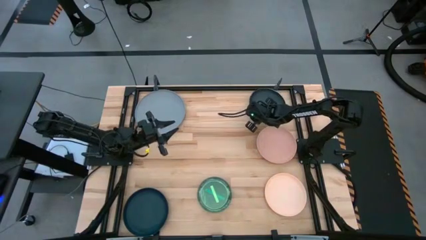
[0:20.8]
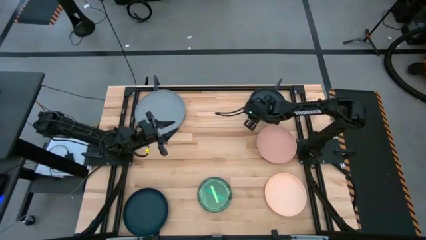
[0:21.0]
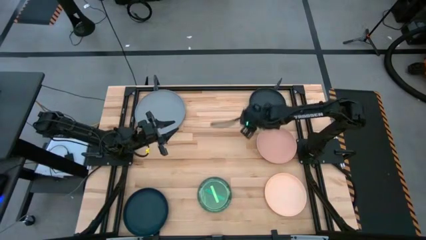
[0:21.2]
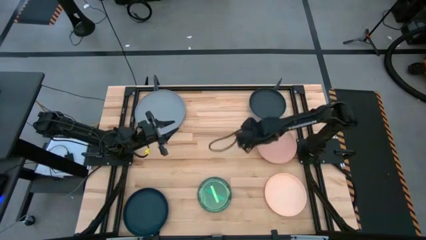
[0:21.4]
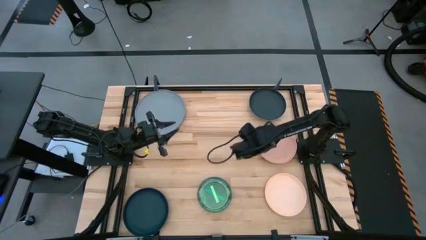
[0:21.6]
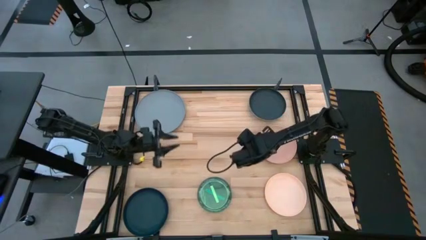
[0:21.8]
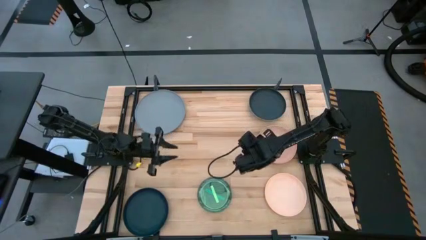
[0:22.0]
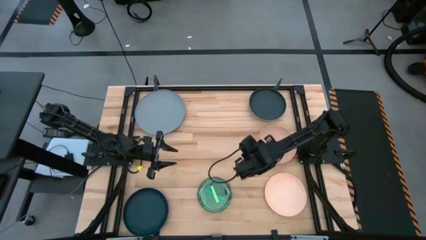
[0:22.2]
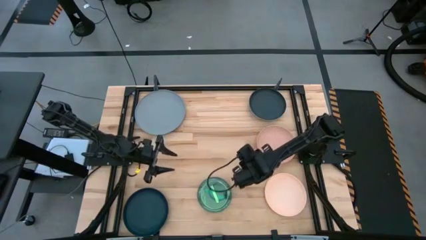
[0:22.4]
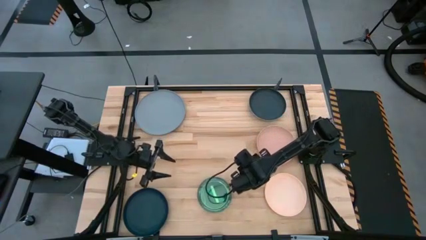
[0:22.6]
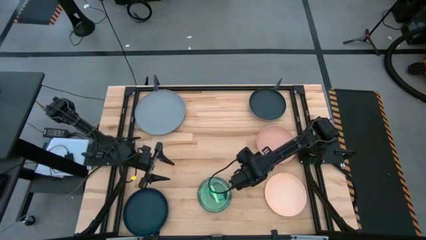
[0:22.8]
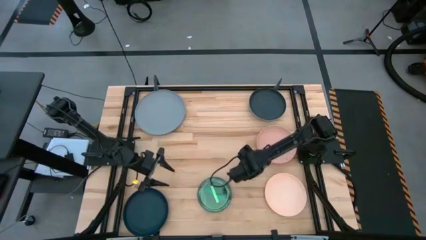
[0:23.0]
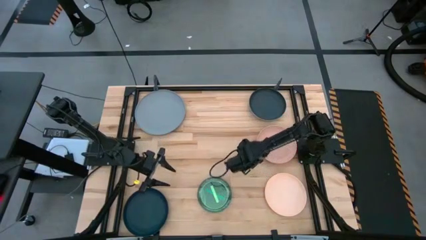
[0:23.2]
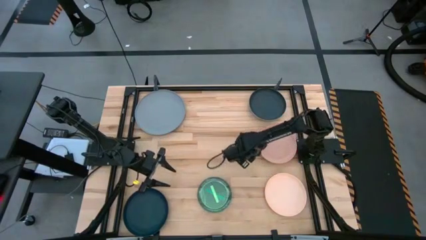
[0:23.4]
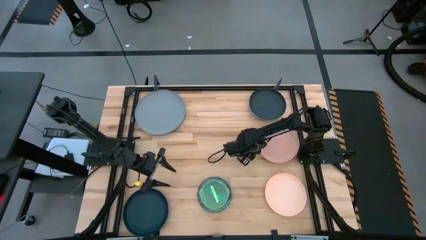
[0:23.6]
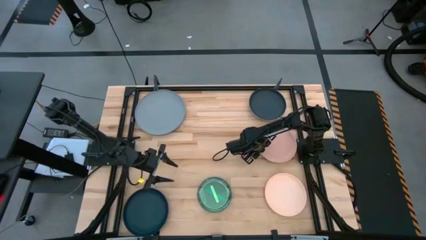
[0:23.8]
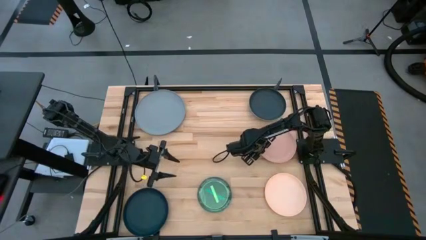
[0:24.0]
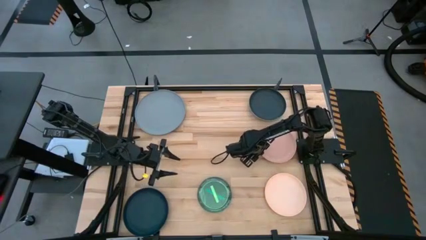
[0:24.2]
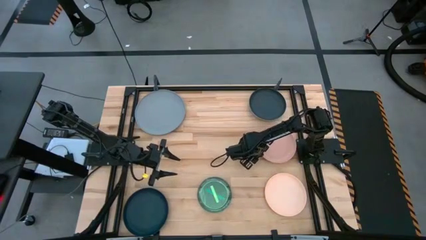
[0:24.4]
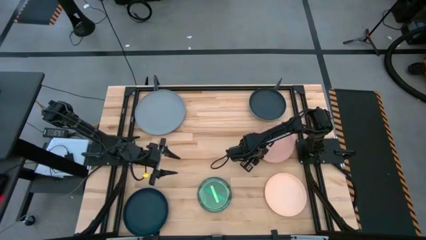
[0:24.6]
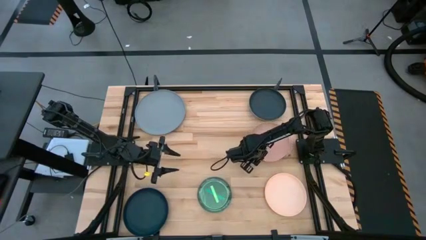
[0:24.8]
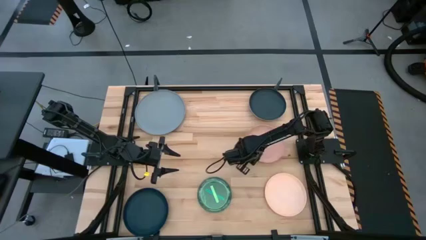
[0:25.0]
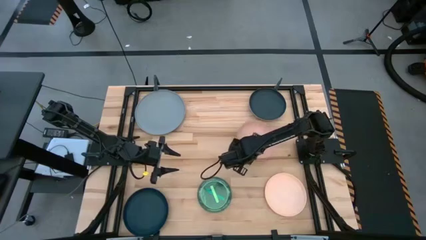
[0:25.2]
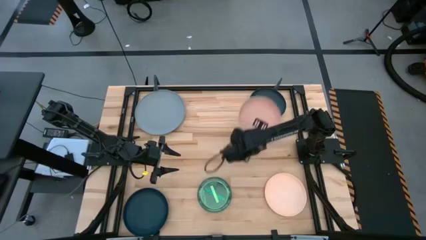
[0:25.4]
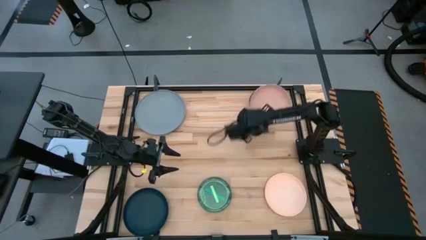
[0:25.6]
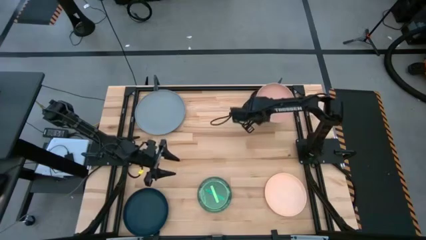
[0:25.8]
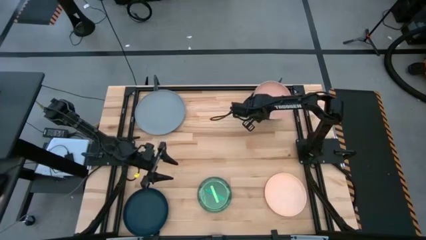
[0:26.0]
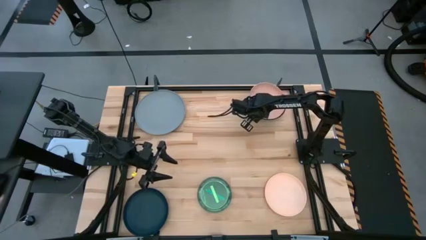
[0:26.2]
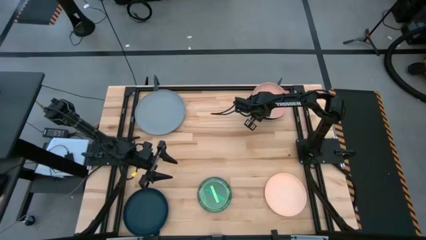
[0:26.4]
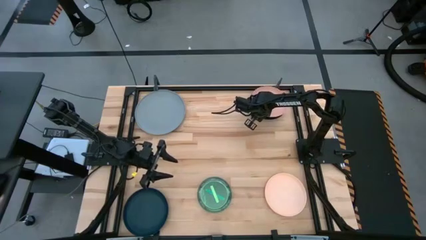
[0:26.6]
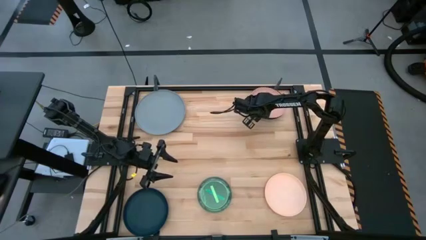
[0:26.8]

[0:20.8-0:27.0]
Task: Stack plastic plates
Stack the light brown plate on the black plate

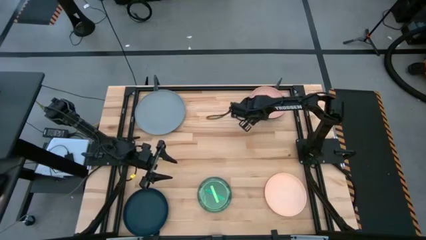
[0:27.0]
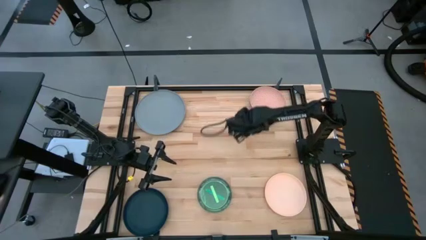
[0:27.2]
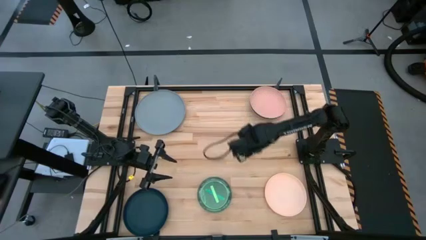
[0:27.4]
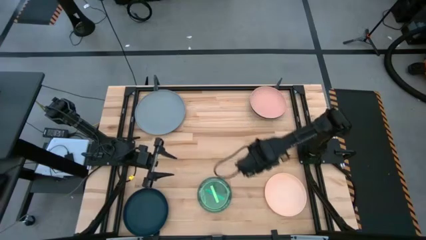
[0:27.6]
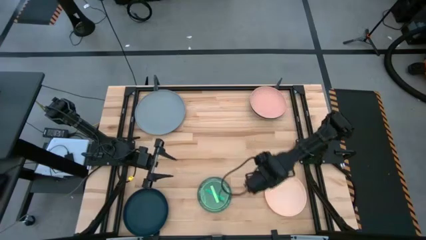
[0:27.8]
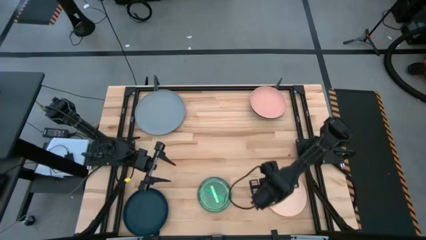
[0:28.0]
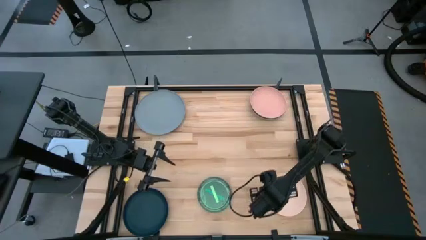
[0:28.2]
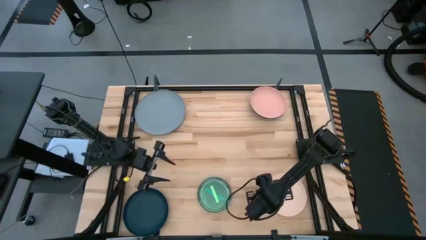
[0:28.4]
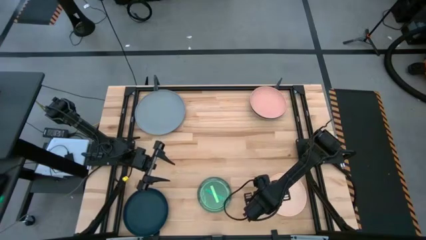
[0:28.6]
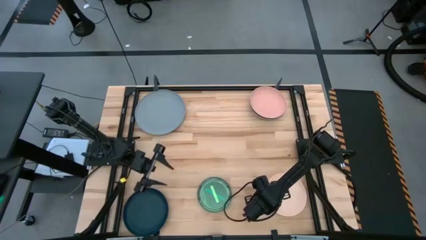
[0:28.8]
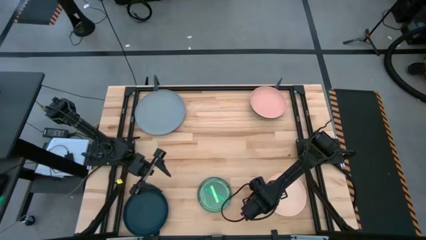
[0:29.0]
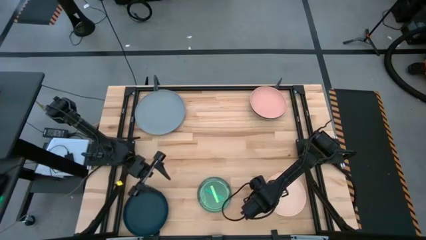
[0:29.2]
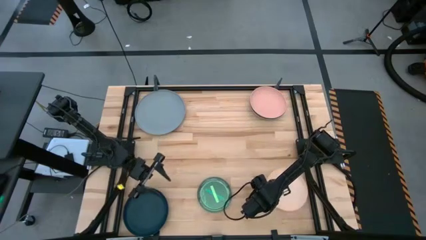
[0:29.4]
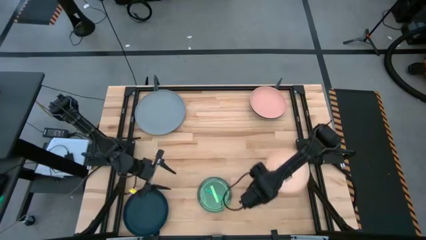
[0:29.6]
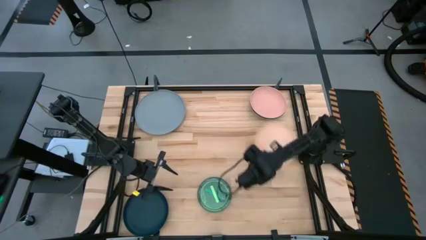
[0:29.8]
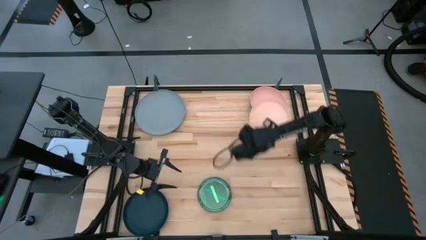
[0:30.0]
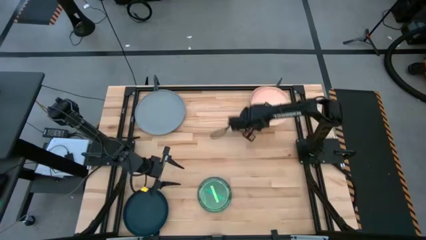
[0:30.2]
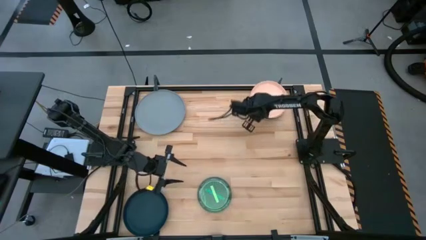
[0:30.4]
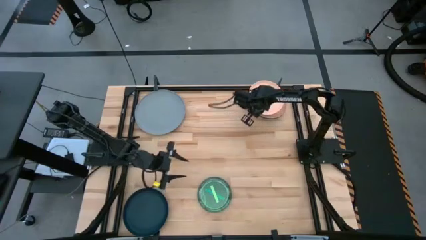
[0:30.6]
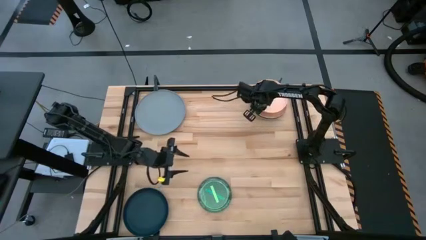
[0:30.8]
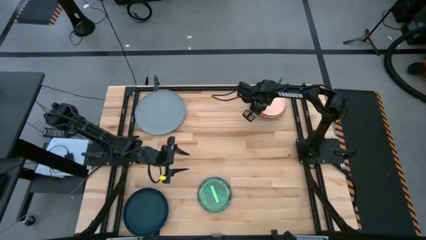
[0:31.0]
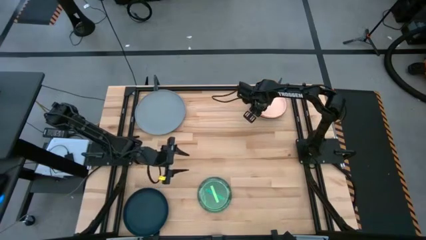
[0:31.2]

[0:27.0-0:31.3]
Stack the light orange plate on the light brown plate

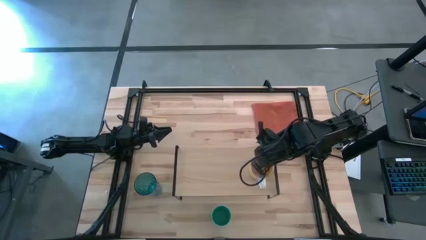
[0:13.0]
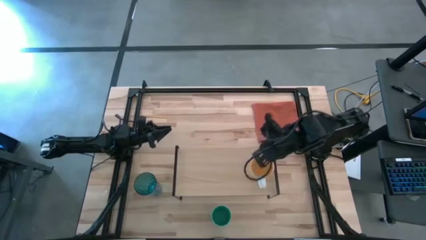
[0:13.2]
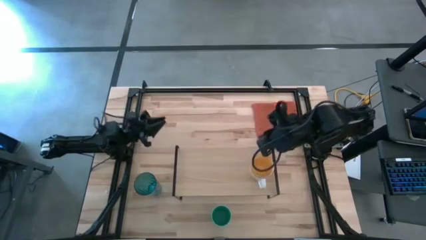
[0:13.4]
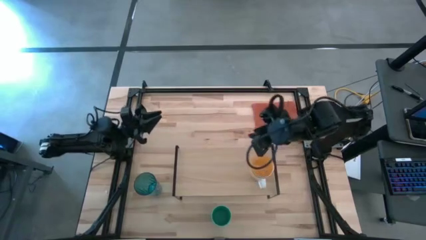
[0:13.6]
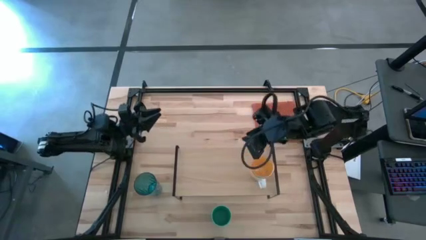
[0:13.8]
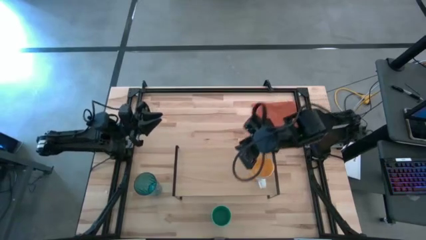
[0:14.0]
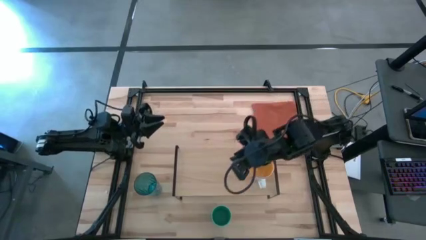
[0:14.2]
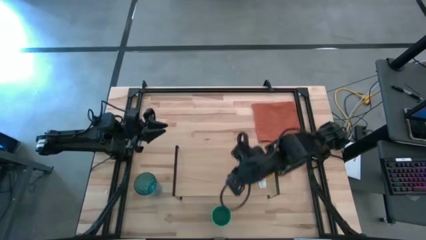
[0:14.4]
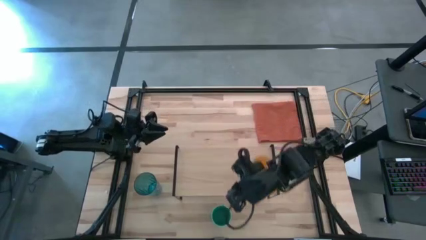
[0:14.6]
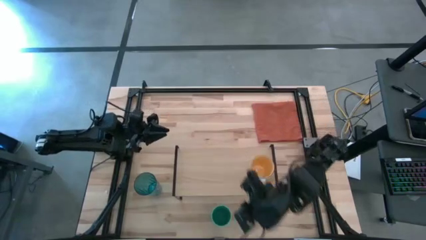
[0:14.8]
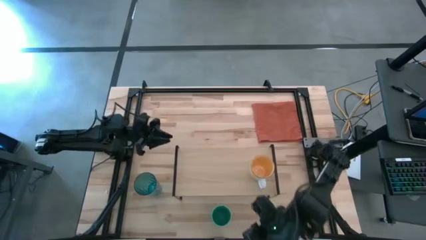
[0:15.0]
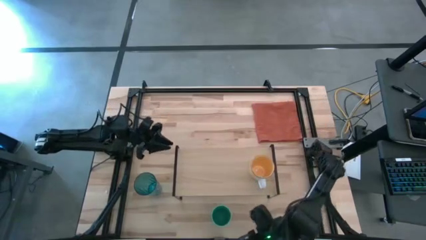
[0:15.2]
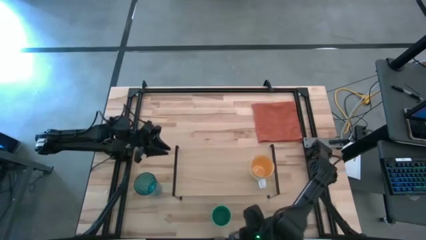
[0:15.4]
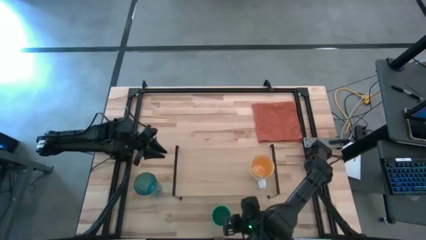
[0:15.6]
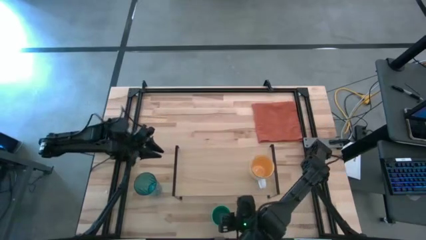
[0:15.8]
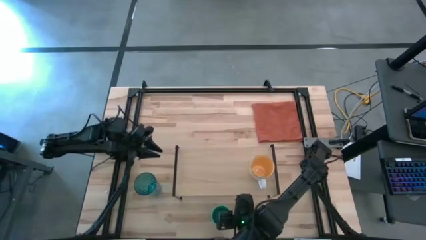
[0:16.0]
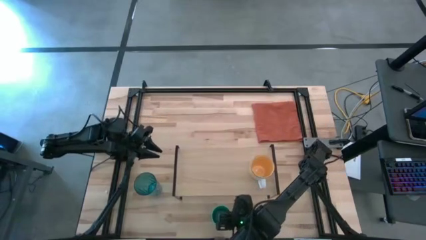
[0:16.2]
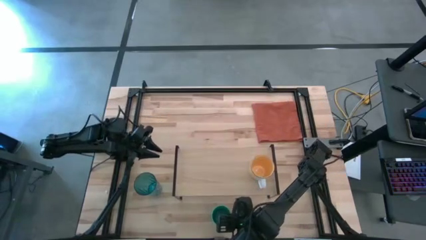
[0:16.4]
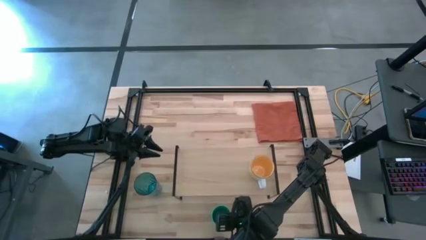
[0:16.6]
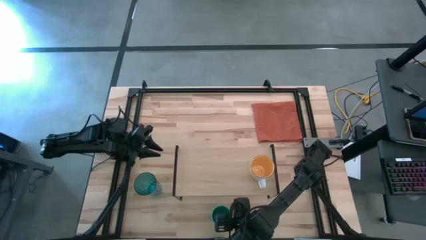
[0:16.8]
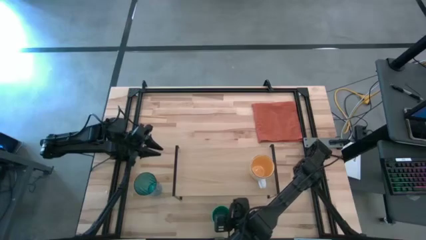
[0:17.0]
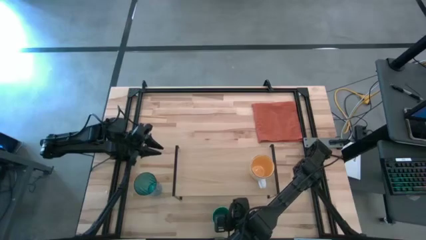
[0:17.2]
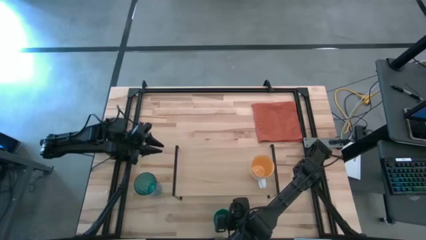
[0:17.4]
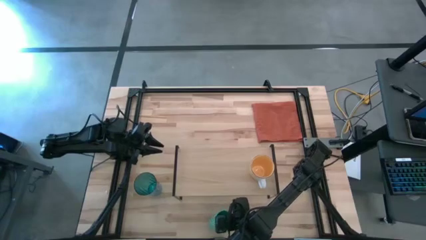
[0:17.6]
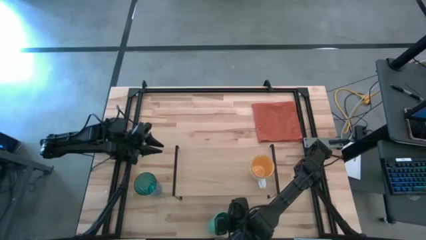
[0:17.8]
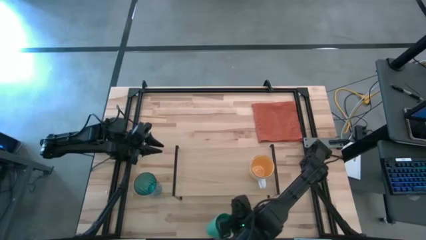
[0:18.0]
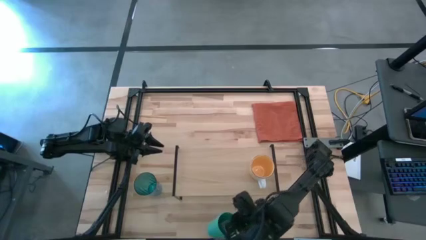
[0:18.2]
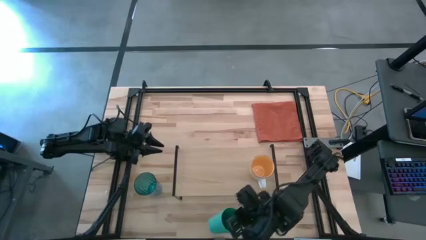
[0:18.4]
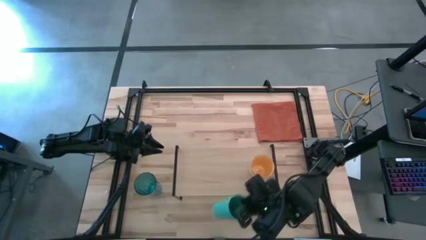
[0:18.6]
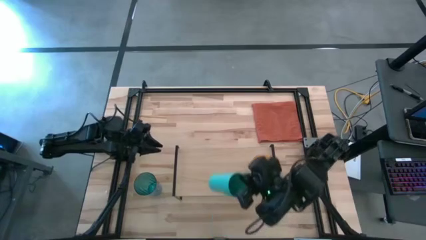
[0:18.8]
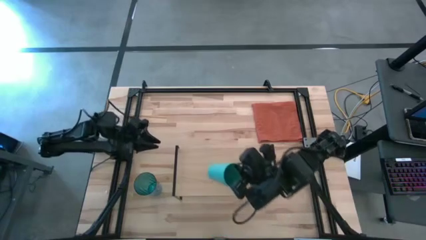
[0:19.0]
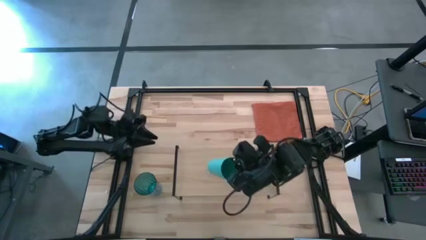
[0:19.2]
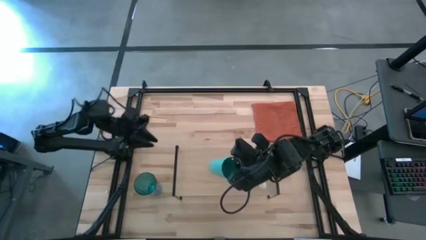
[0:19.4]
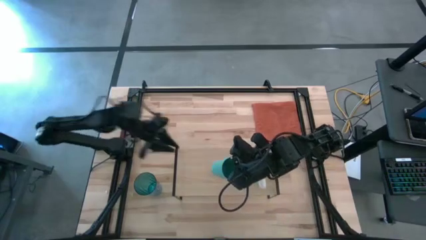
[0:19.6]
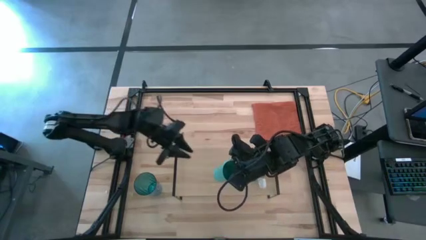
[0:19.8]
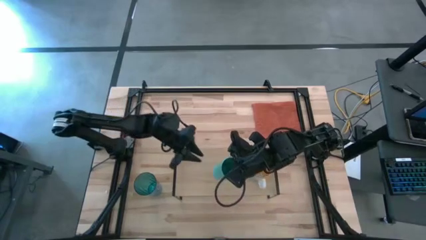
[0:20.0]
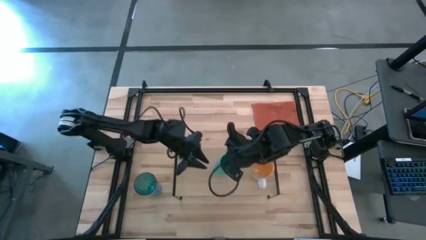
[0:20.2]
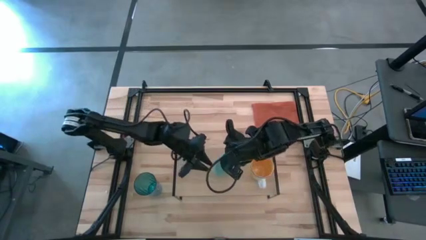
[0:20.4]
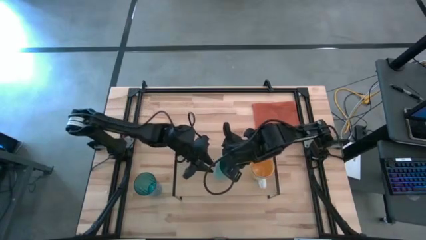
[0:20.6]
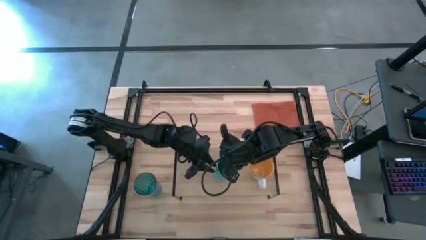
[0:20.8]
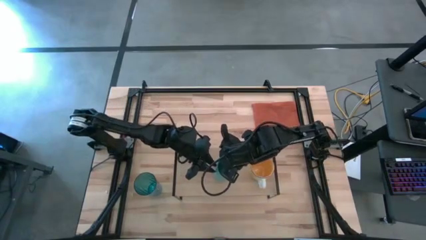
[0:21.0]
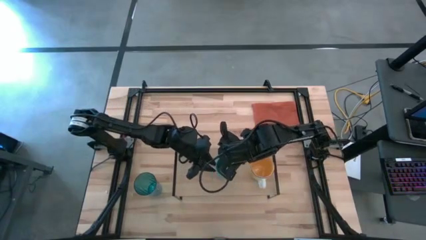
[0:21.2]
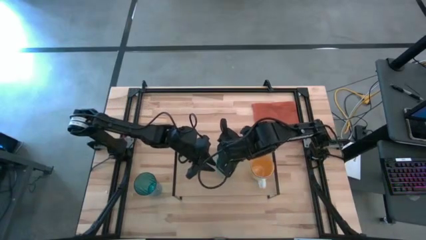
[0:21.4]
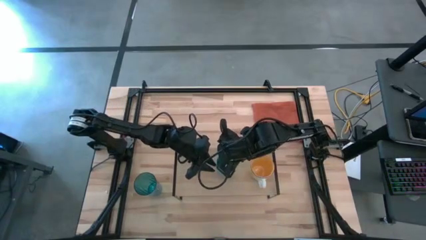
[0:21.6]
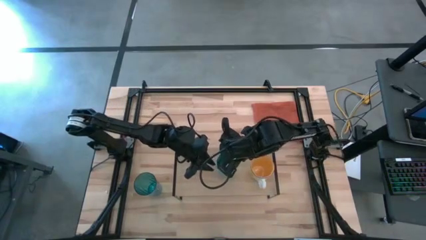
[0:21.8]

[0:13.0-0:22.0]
Task: Stack small to large cups/mugs on shelf
Put the green cup on the shelf
